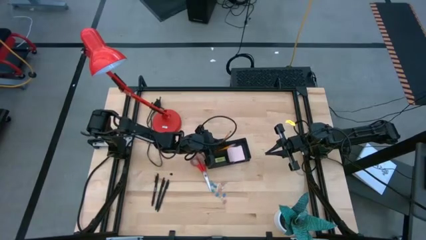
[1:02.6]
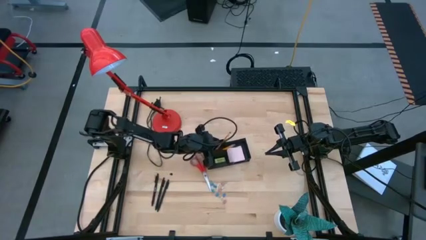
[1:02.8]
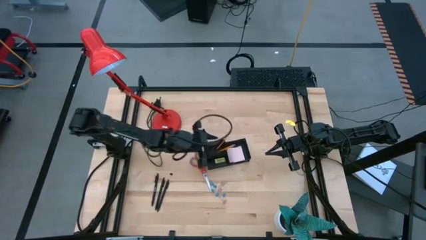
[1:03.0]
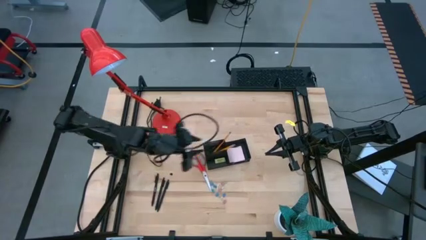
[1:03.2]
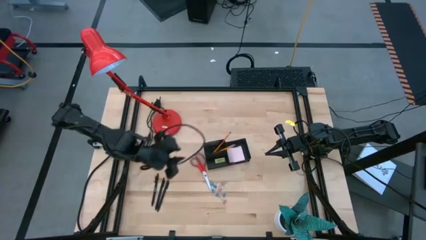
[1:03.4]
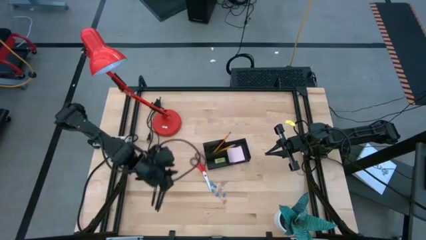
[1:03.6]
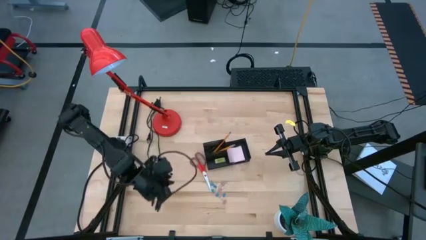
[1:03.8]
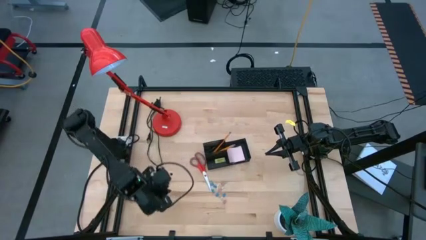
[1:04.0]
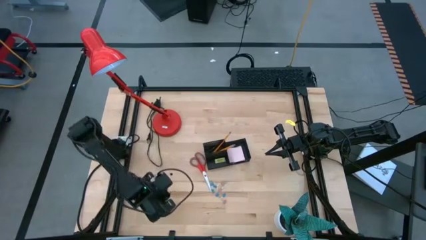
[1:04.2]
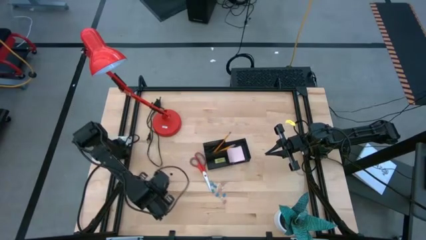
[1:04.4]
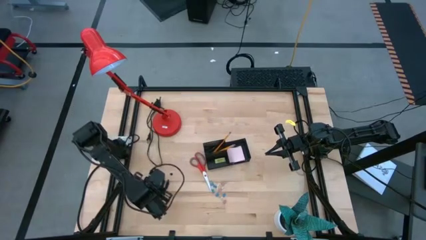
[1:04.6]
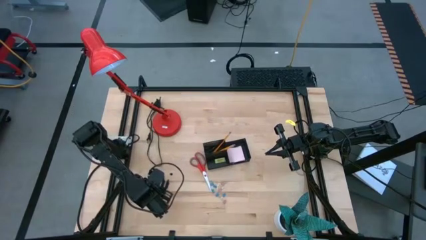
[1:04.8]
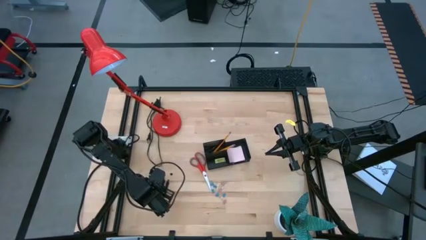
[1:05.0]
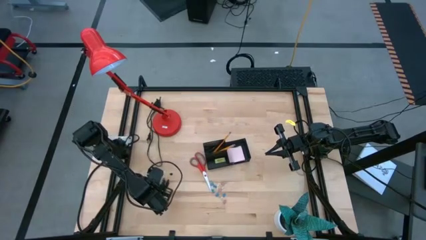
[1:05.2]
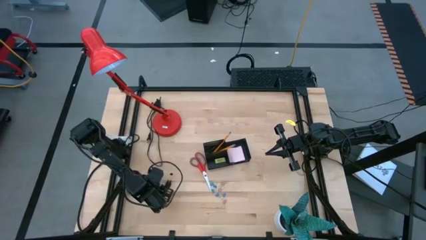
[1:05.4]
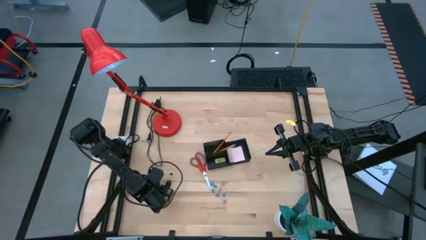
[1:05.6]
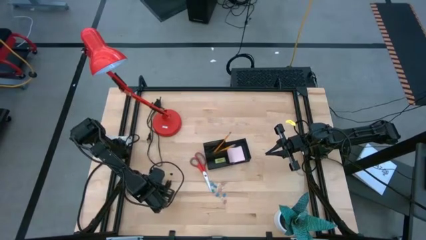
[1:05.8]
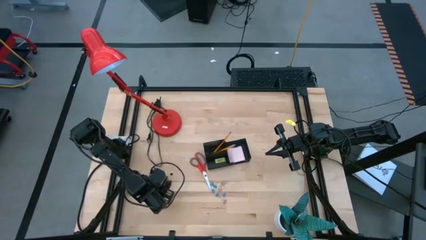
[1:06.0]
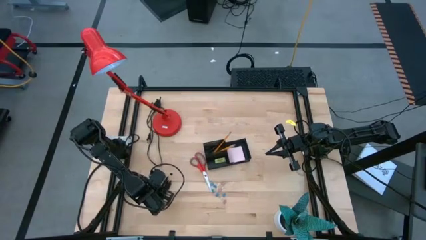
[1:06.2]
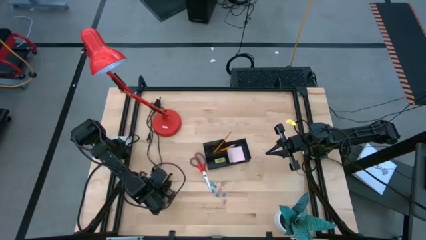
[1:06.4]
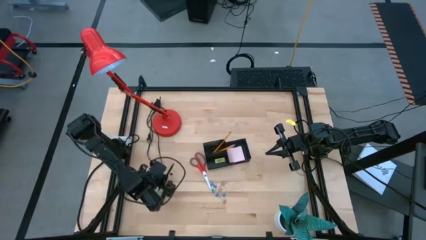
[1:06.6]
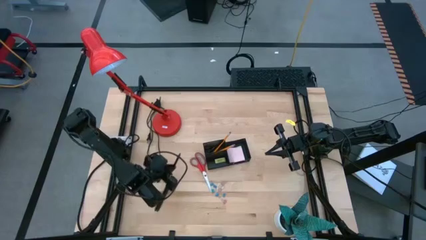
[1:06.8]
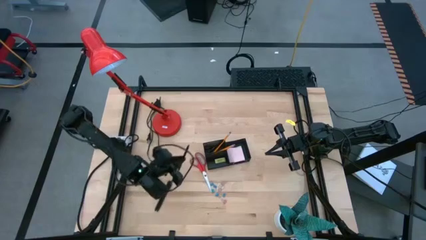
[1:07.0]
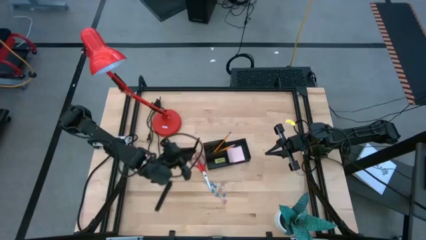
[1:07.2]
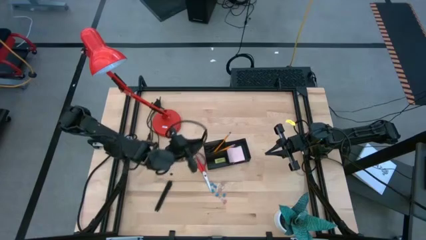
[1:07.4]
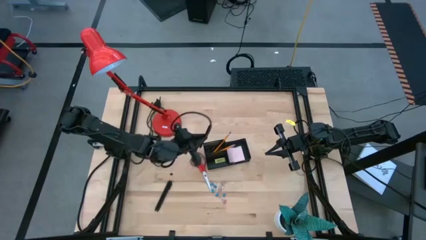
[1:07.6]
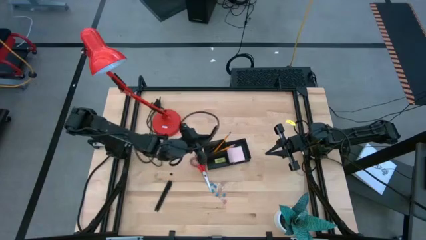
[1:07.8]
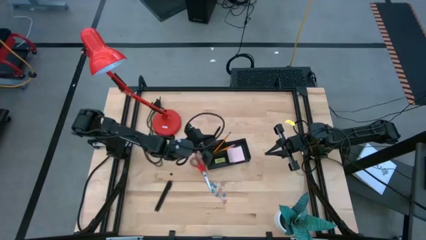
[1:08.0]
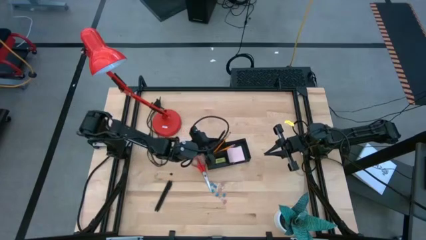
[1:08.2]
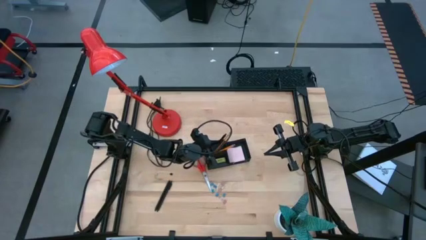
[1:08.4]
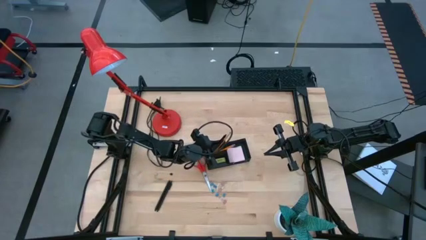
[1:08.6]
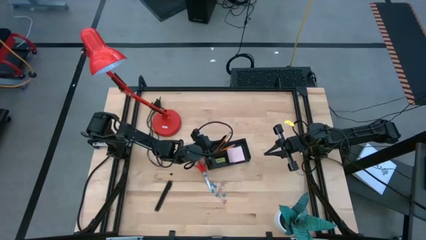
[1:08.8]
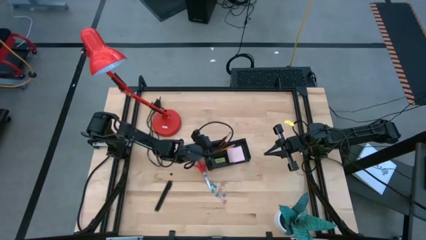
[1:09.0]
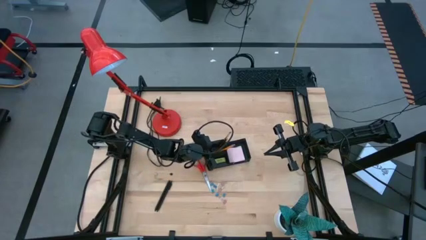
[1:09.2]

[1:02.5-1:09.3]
Task: Pick and place office supplies into organizer
Put the black pen into the black desk organizer

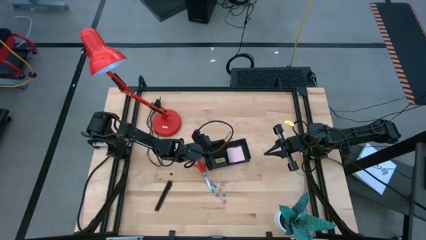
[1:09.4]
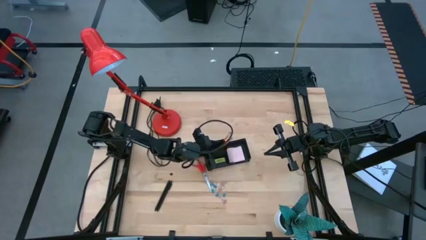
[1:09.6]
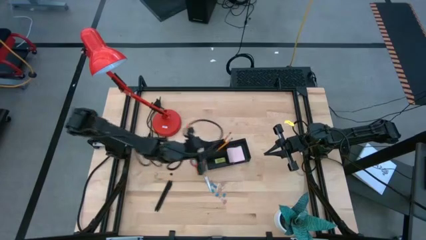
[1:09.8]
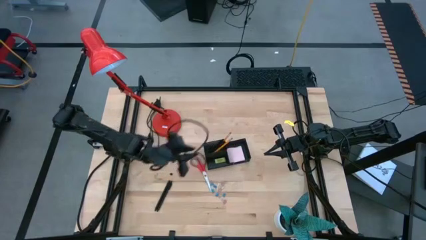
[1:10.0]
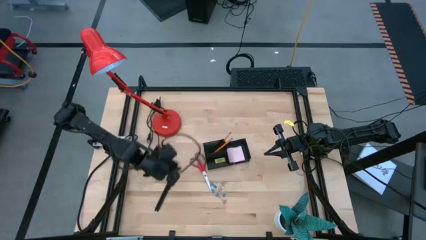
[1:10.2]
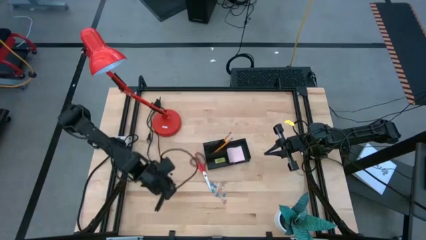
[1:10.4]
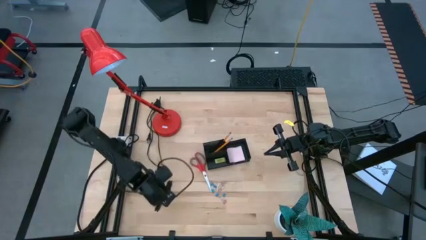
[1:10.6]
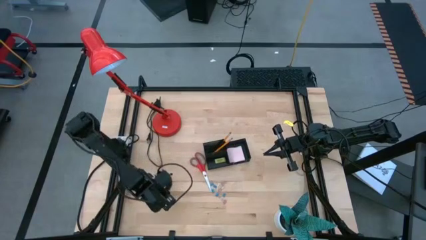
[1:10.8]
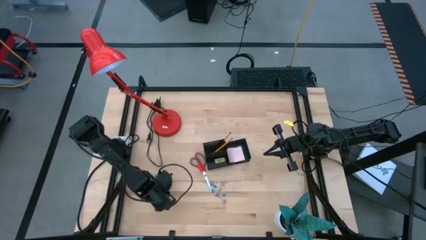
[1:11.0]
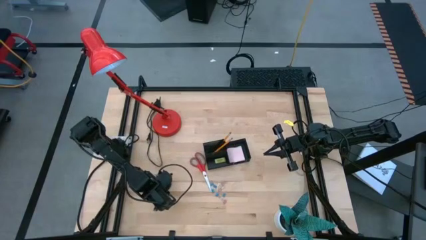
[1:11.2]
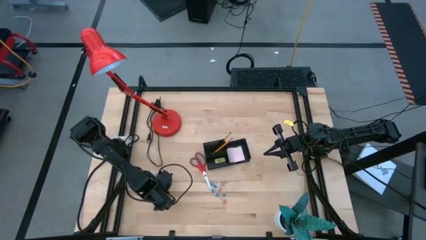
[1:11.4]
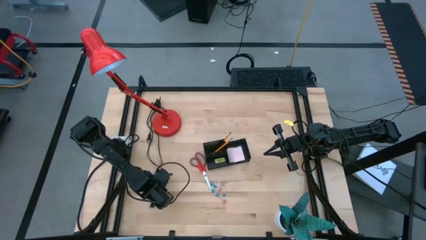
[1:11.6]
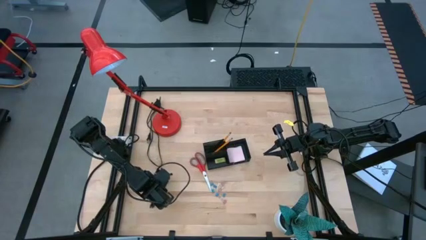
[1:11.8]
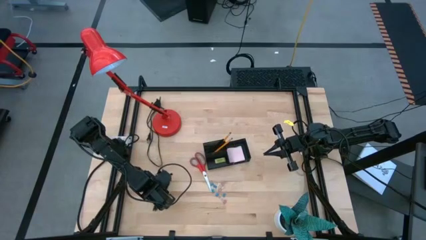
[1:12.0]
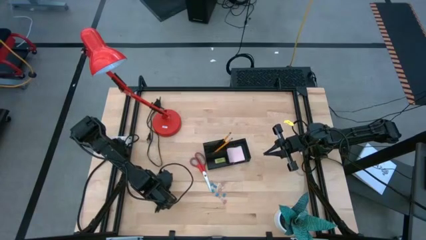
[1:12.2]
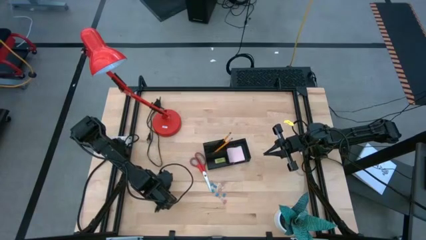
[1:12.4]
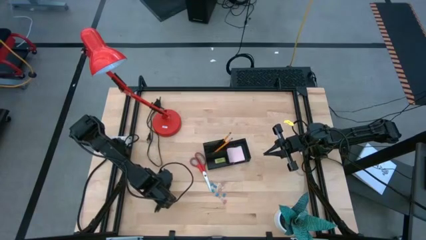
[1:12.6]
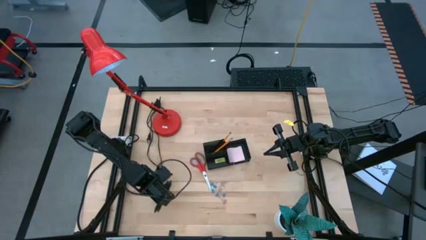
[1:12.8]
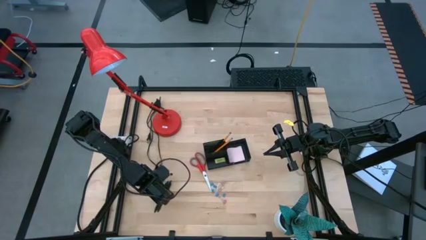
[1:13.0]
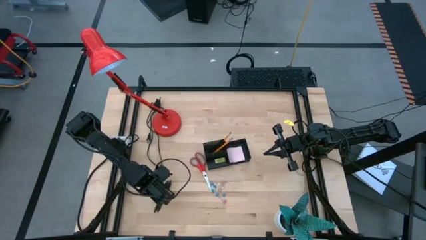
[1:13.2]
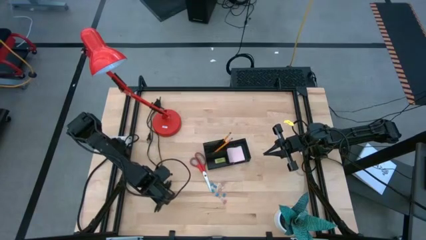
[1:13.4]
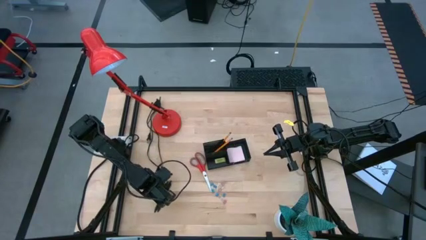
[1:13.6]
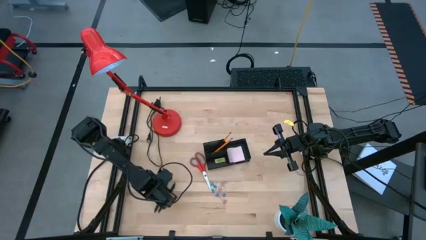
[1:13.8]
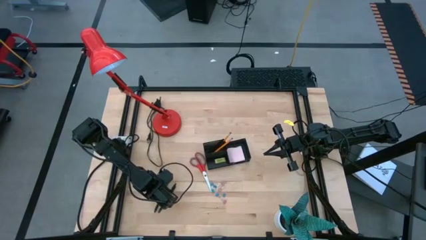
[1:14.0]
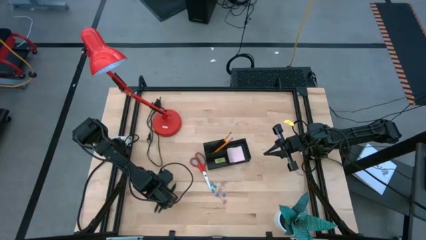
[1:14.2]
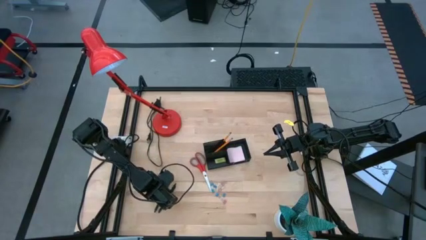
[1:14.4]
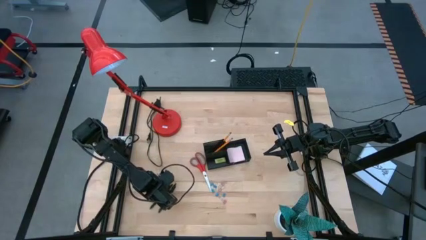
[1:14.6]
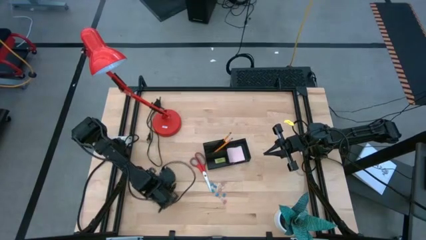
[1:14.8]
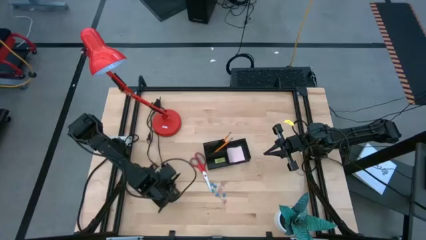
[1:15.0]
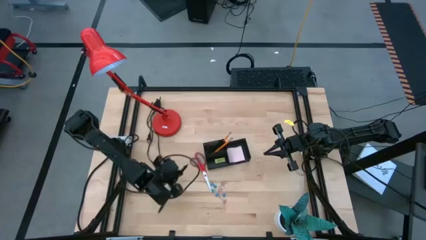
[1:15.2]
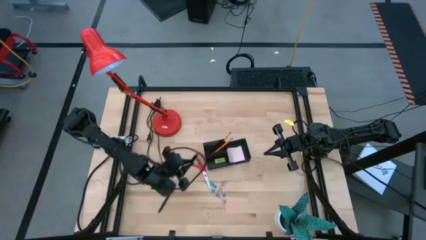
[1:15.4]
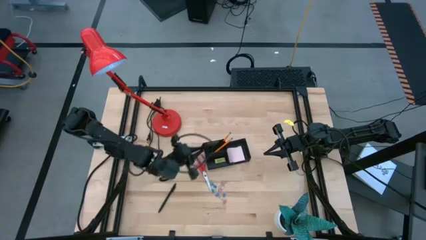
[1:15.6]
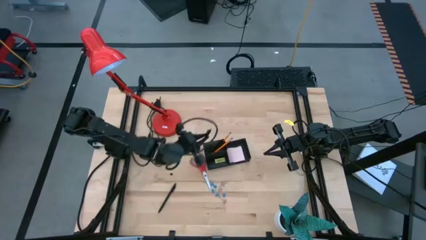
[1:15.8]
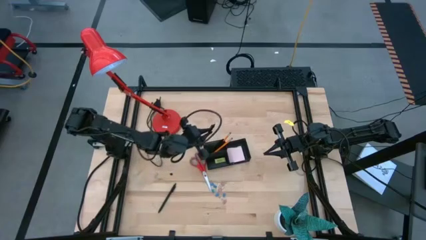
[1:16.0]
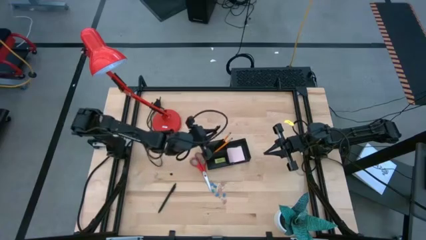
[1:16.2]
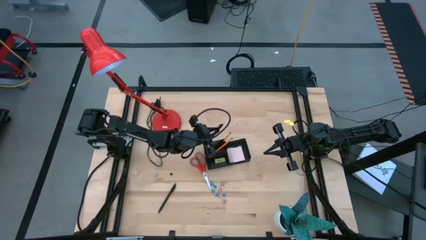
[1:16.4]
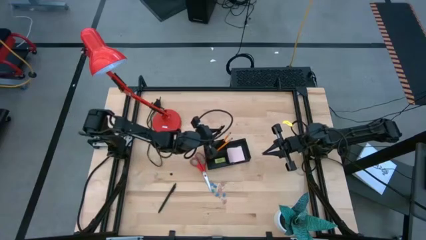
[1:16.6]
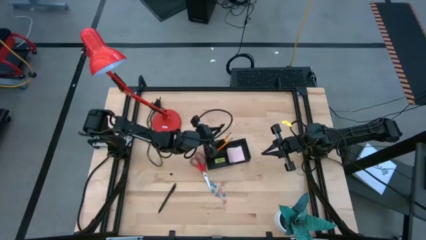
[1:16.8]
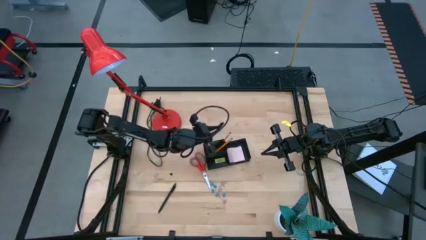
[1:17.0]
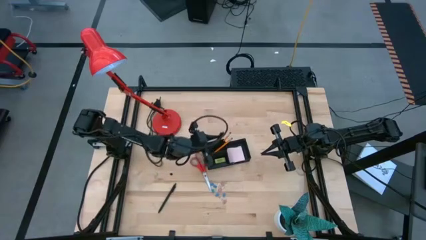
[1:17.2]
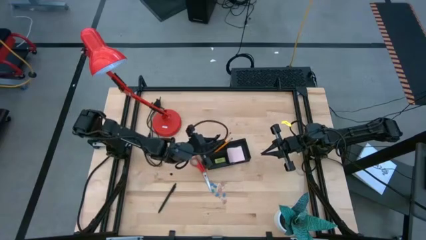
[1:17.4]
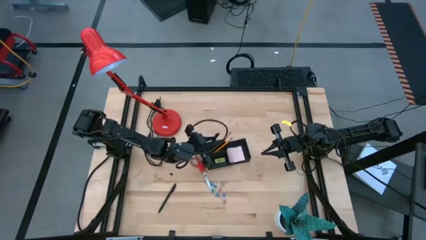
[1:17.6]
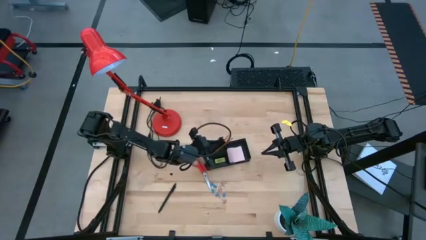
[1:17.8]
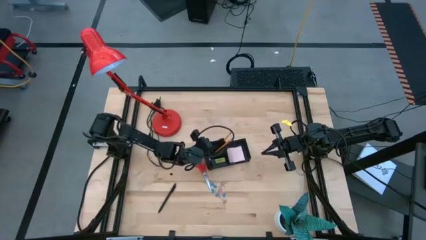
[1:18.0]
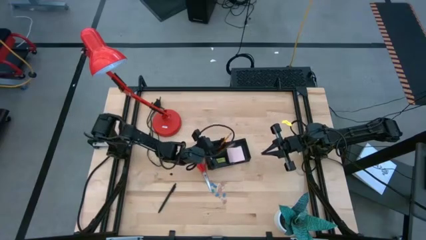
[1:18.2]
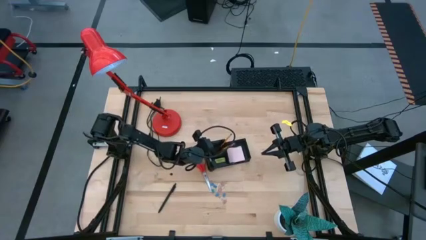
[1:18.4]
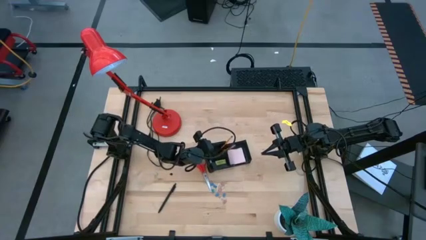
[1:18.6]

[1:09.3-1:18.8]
Put the black pen into the black desk organizer

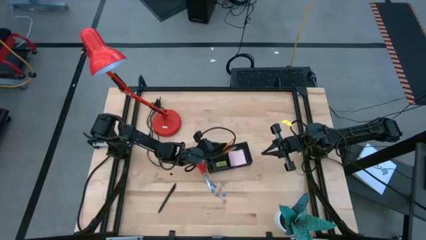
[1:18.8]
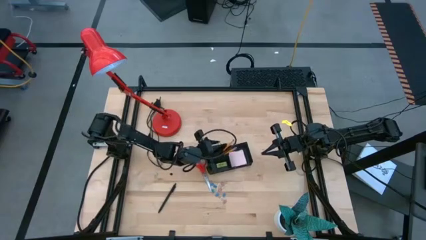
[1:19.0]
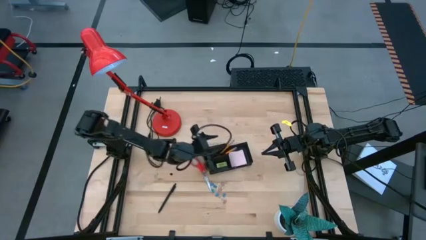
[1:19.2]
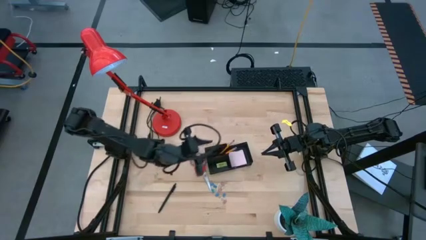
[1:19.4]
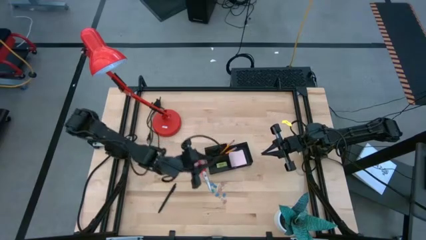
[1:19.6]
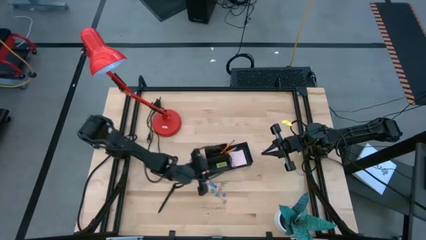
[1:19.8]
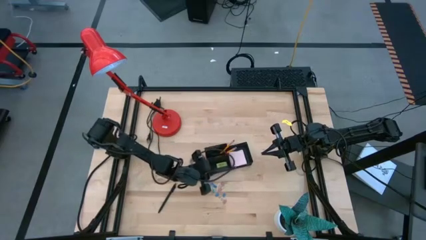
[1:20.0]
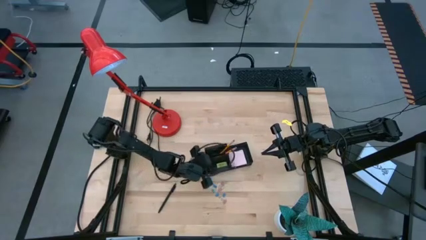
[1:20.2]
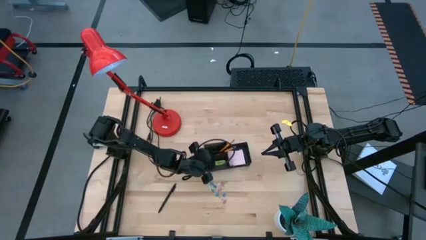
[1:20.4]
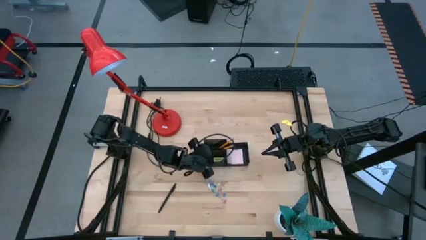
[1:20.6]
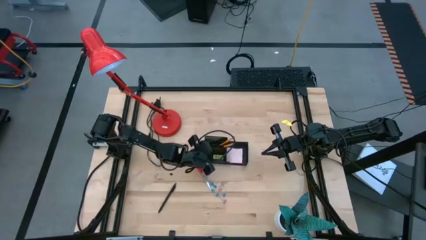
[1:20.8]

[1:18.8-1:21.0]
Adjust the black desk organizer
